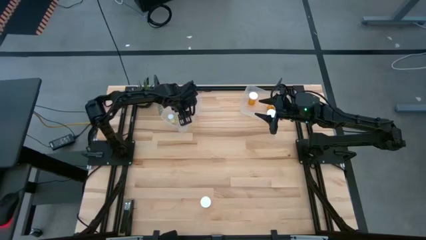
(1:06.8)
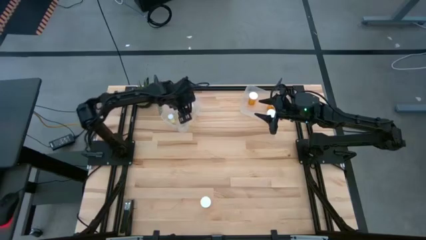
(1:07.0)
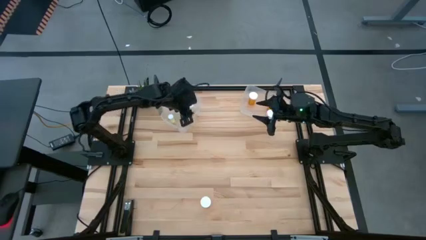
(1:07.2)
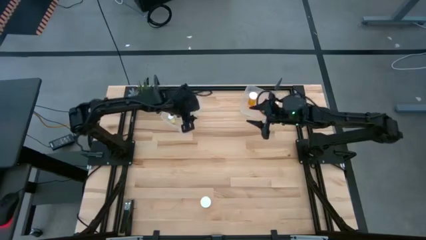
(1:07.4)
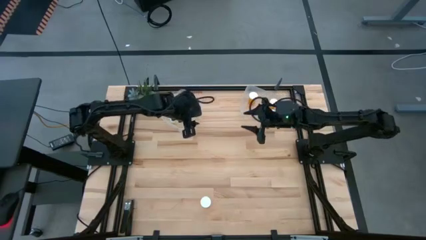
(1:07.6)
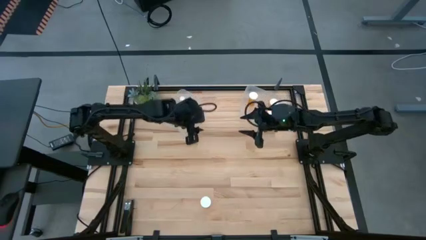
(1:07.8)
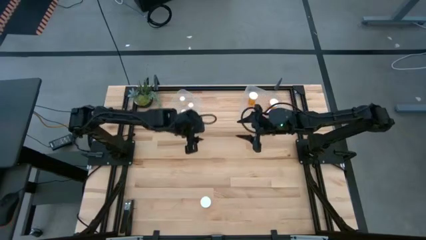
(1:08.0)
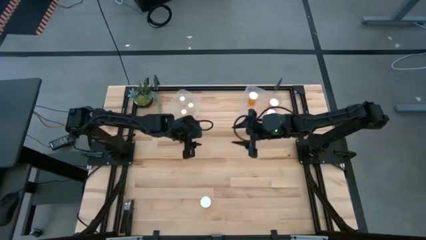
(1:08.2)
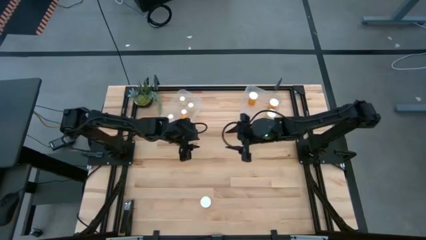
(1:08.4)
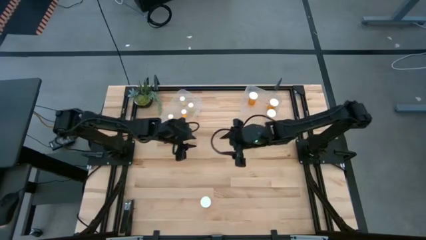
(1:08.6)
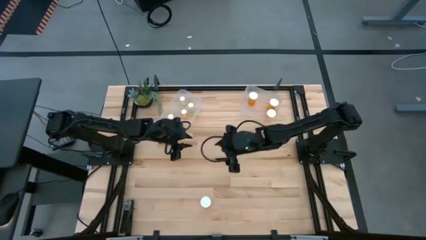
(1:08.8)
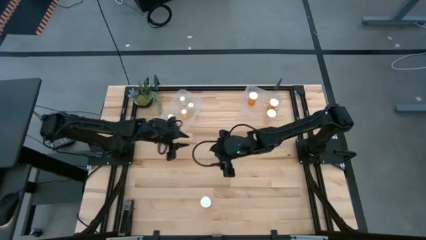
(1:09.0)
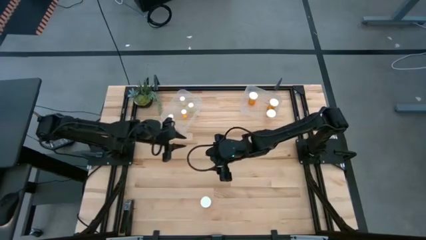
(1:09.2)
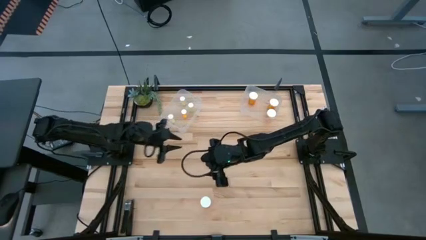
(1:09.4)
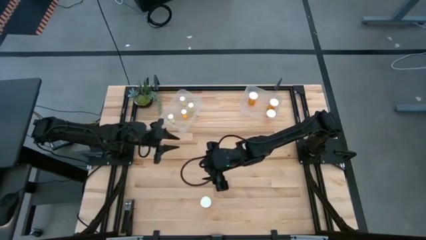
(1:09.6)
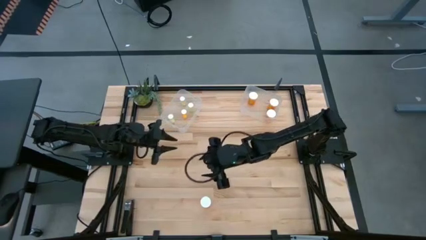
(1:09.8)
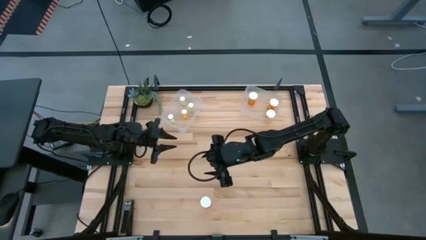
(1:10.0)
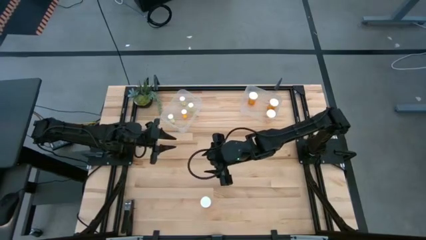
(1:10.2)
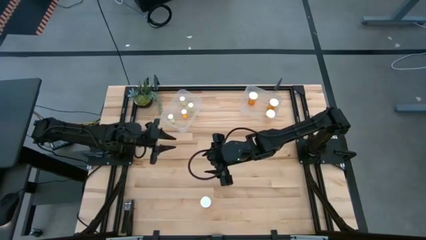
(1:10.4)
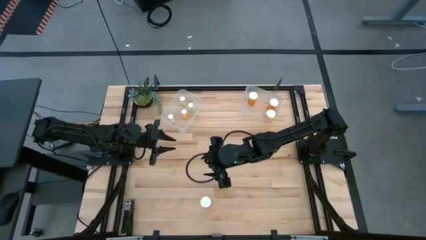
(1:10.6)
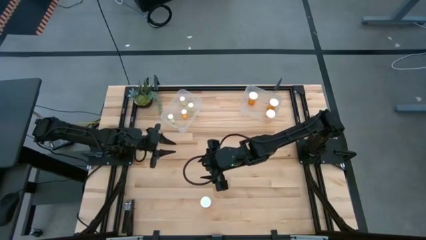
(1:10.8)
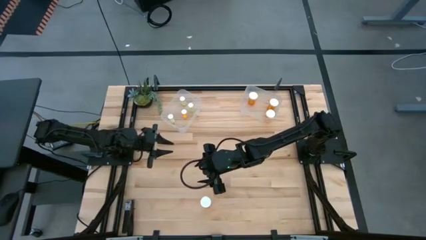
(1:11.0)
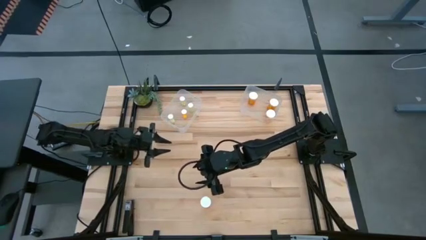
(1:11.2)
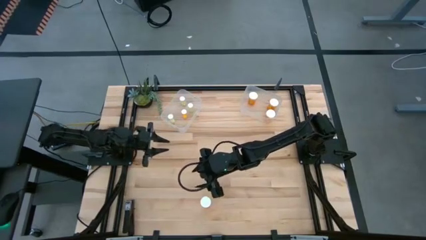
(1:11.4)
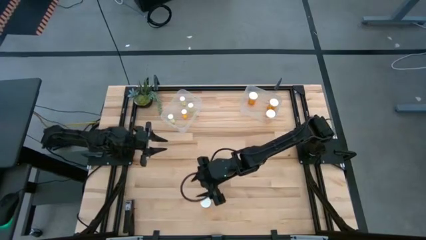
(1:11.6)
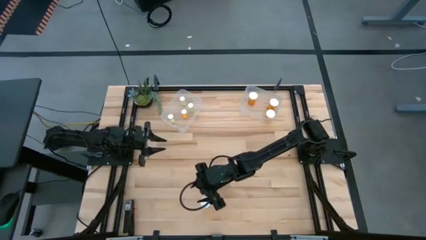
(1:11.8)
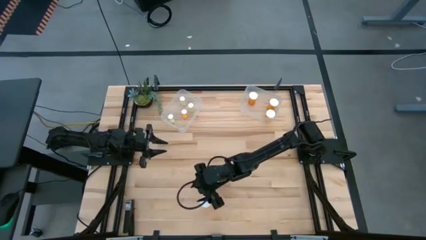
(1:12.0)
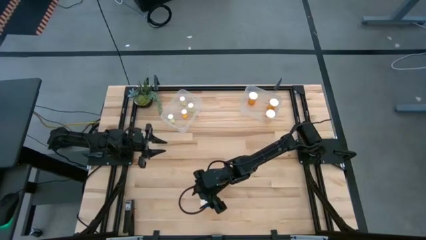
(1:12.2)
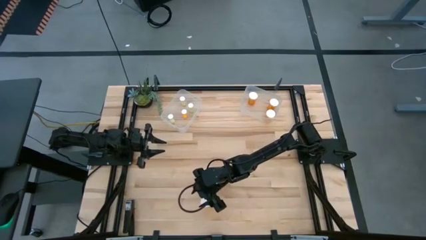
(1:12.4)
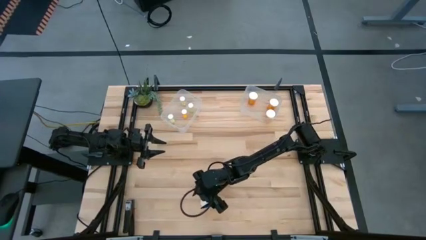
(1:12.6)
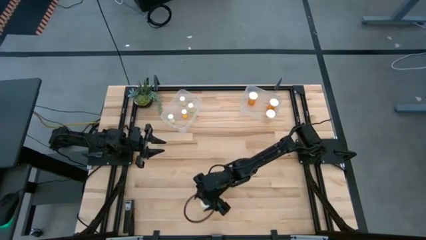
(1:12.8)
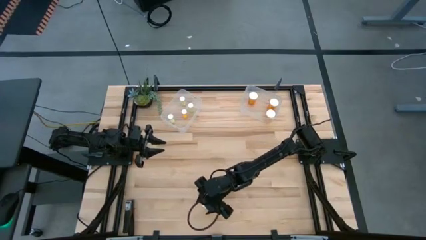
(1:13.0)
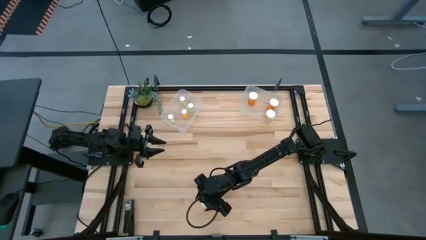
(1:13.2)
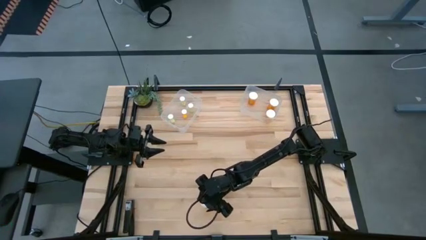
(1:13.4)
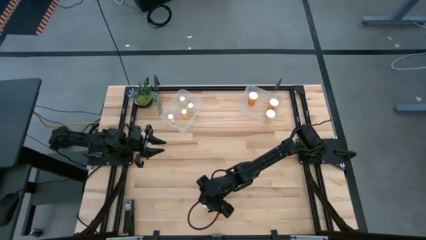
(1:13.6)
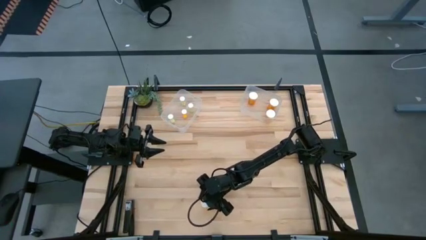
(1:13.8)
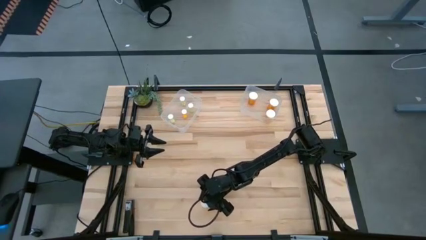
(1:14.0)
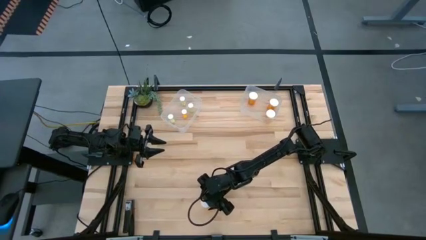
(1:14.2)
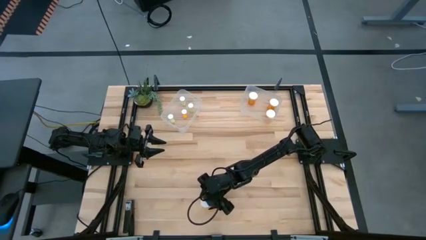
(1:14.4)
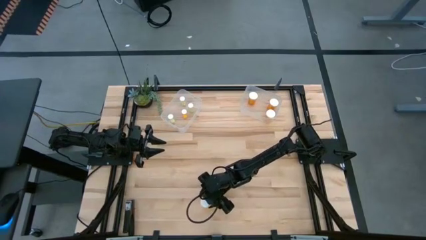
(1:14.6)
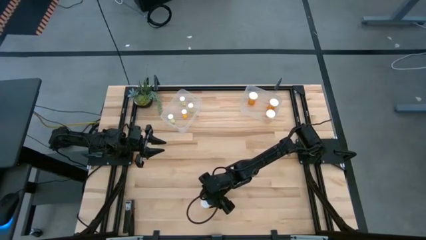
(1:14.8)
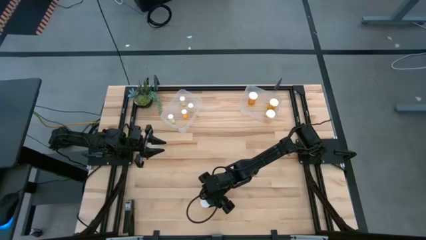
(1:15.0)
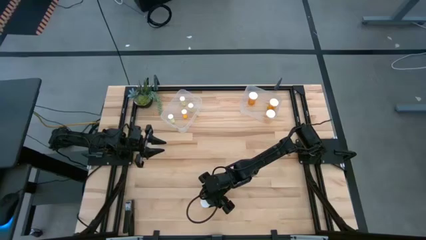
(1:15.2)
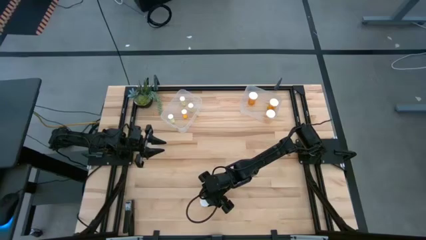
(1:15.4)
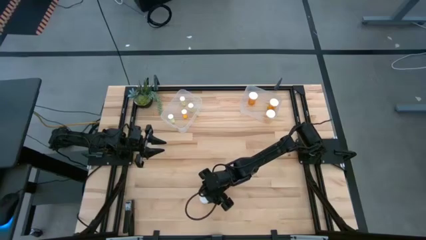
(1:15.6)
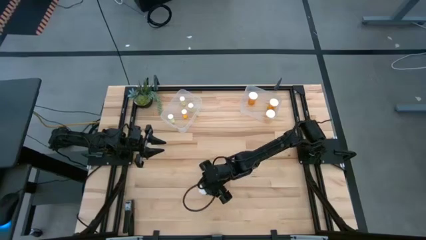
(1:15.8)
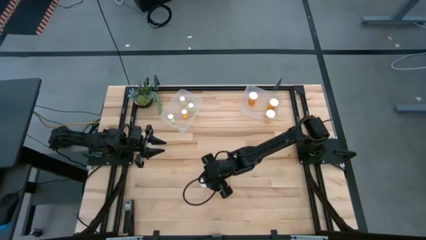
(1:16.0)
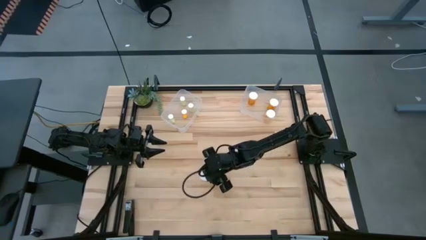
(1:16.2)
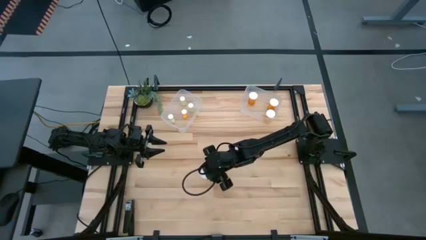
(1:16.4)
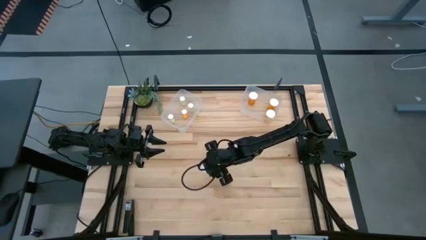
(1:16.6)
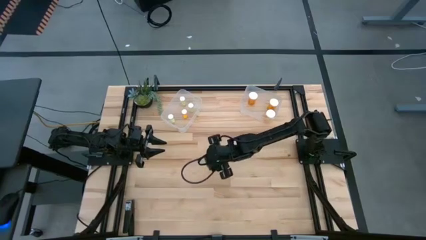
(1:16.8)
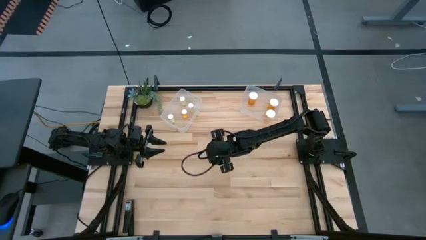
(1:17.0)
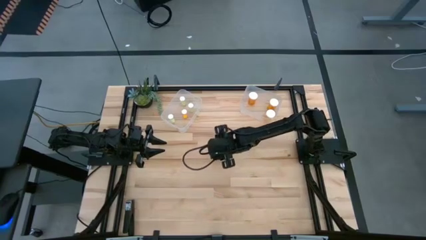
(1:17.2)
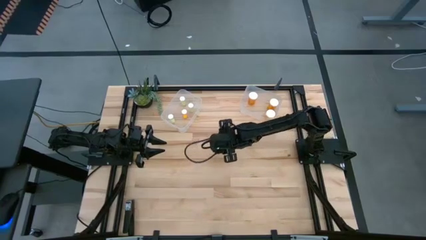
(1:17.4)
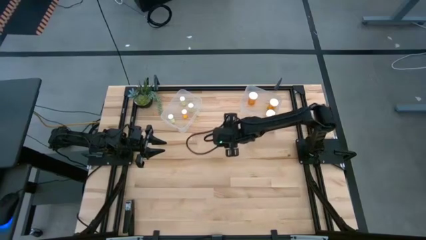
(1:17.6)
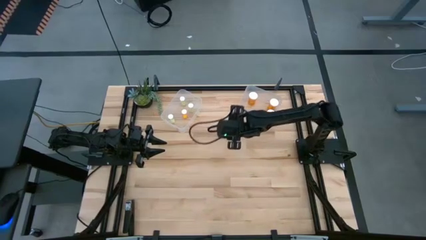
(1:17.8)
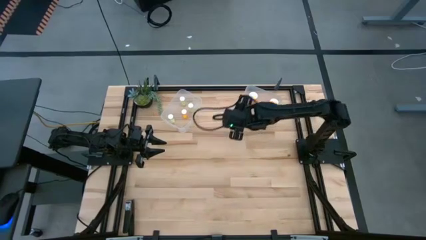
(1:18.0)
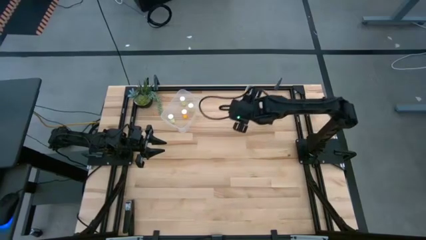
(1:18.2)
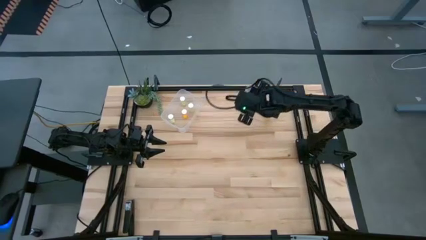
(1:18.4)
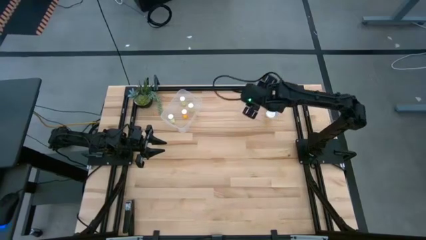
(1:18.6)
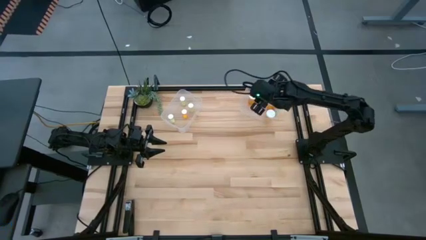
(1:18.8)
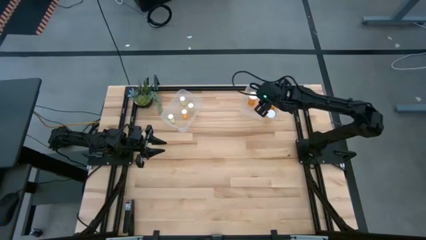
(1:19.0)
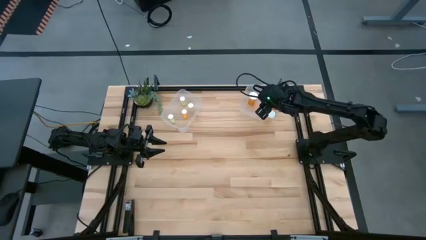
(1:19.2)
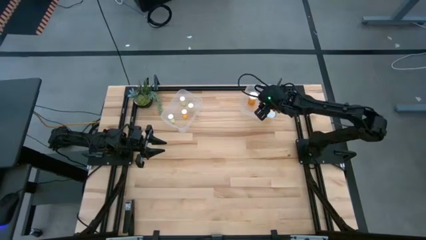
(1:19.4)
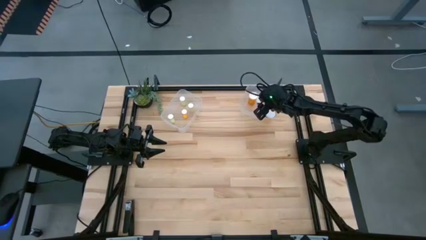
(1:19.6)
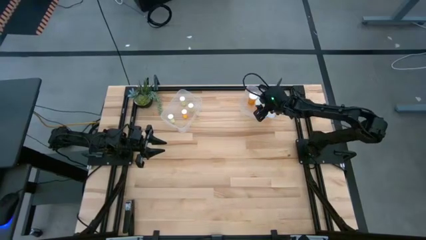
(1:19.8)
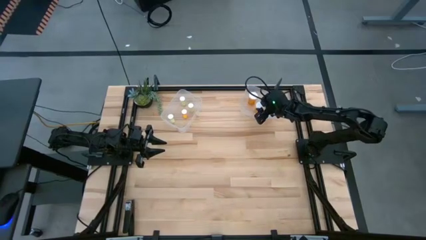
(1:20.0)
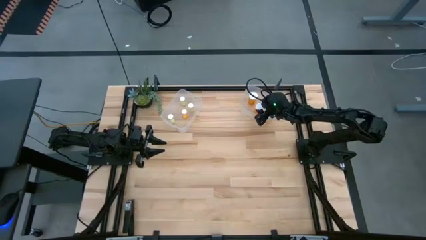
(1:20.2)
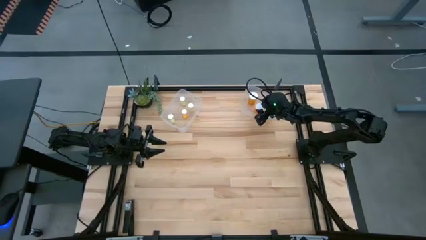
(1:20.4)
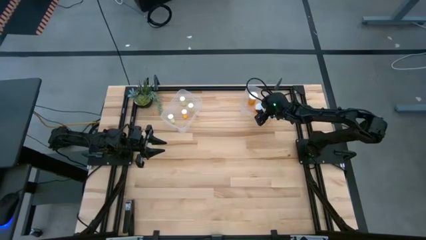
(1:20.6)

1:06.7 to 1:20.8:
Task: Pick and place medicine bottles into bin by pill shape (circle, oval)
Put the large orange capsule bottle into the right transparent bin
